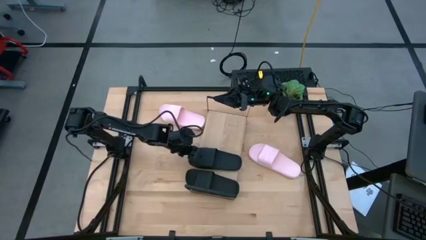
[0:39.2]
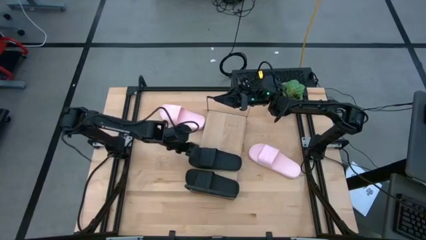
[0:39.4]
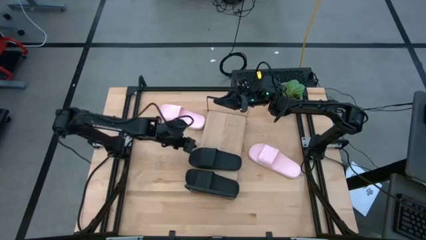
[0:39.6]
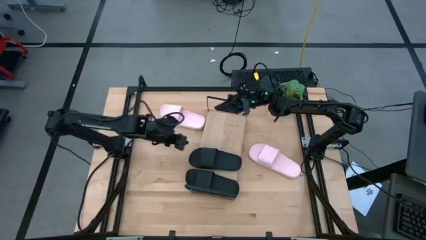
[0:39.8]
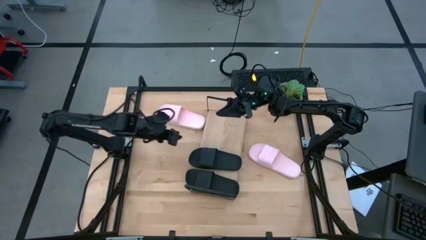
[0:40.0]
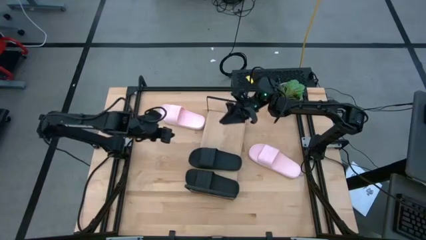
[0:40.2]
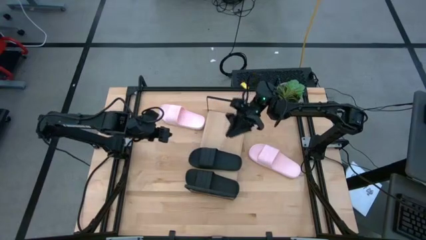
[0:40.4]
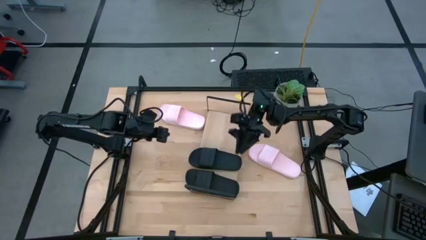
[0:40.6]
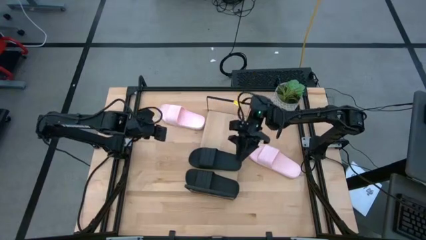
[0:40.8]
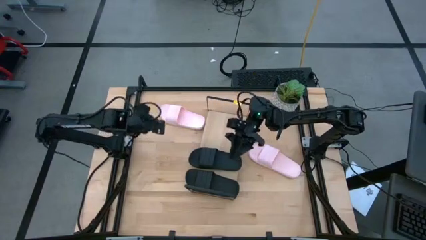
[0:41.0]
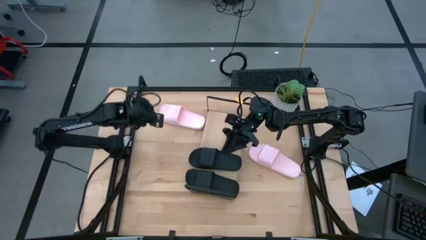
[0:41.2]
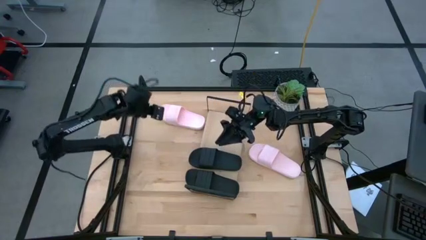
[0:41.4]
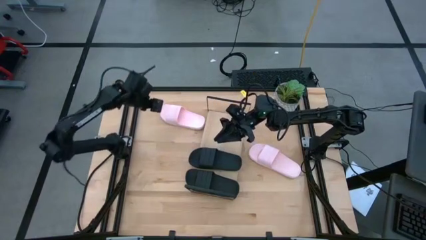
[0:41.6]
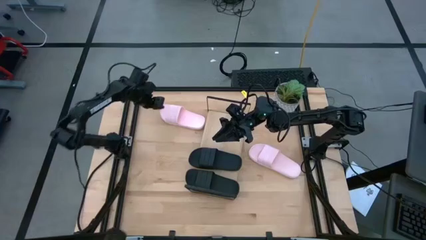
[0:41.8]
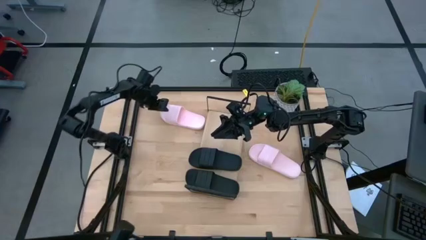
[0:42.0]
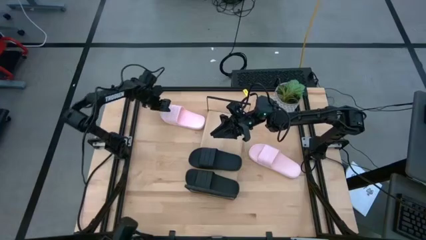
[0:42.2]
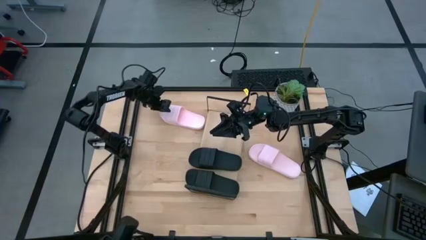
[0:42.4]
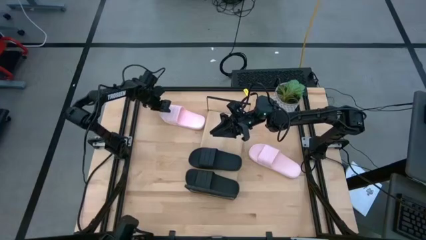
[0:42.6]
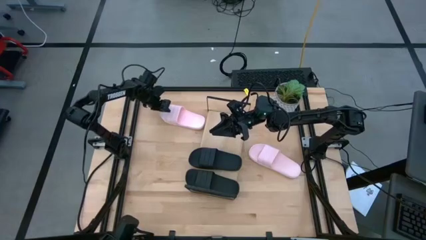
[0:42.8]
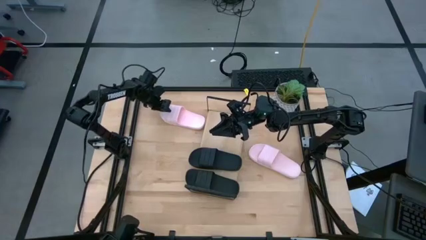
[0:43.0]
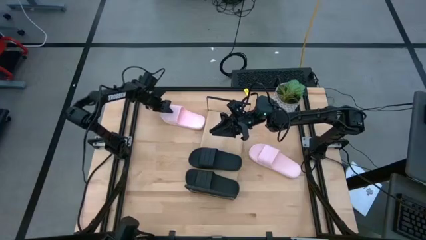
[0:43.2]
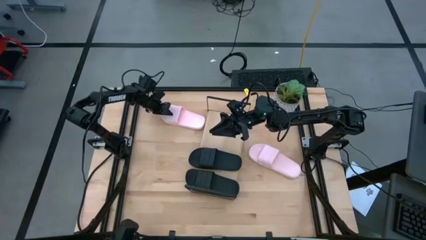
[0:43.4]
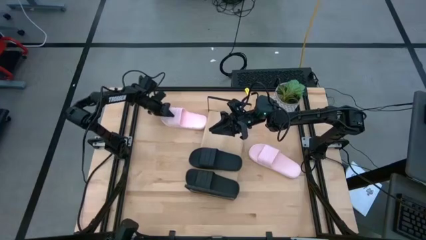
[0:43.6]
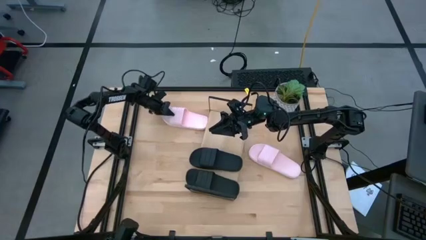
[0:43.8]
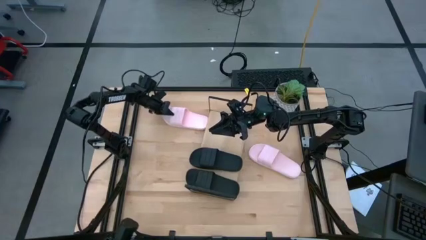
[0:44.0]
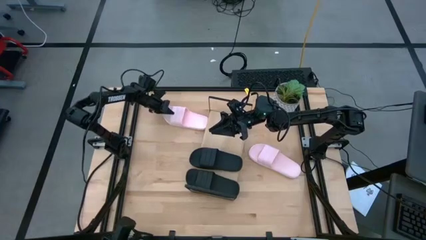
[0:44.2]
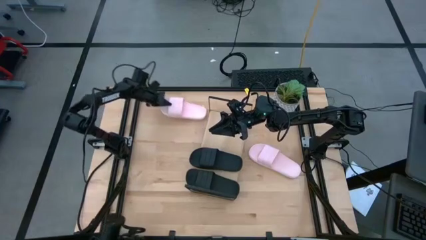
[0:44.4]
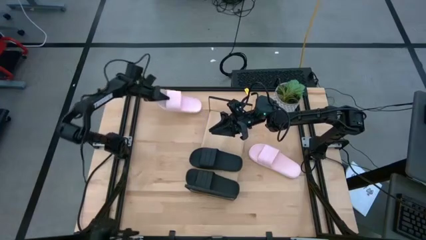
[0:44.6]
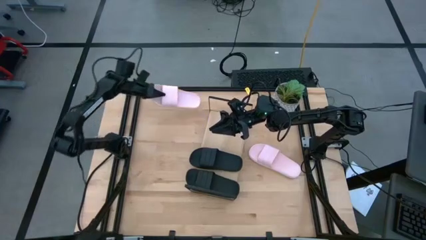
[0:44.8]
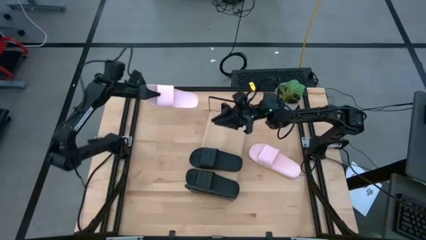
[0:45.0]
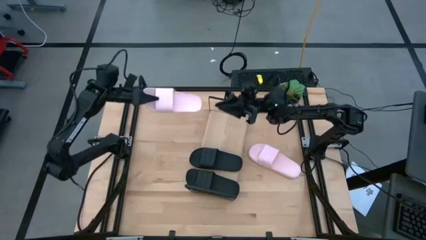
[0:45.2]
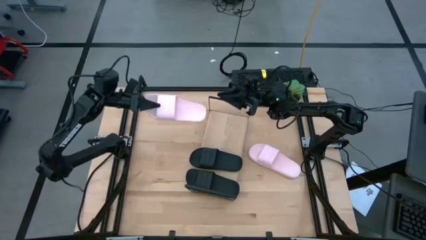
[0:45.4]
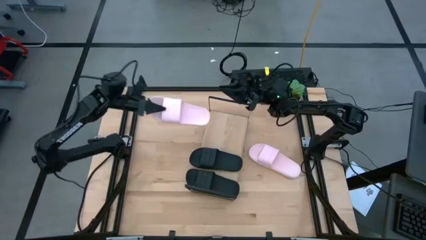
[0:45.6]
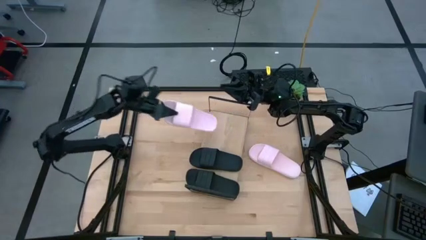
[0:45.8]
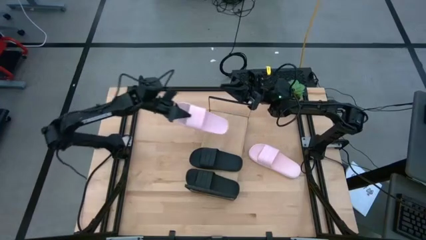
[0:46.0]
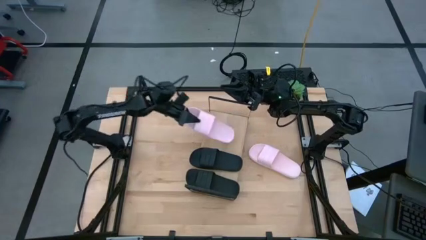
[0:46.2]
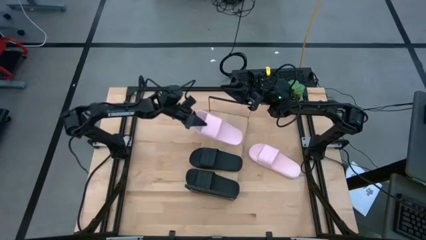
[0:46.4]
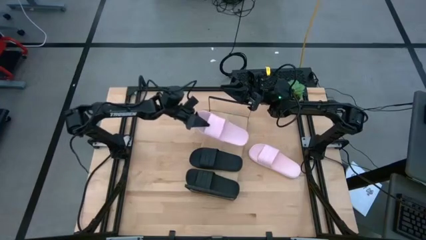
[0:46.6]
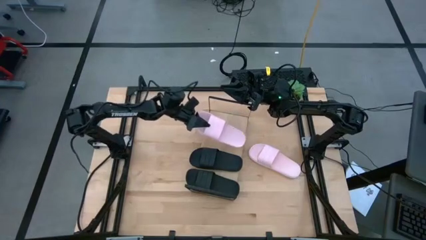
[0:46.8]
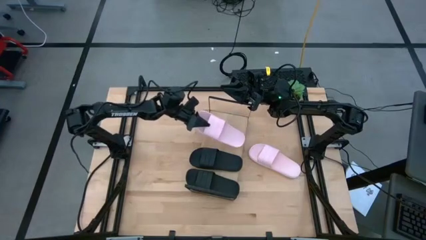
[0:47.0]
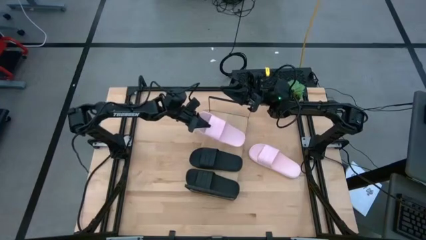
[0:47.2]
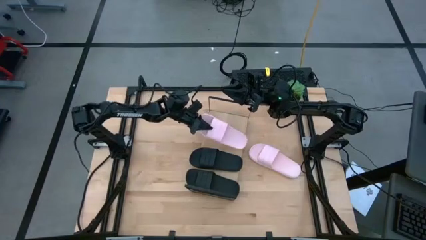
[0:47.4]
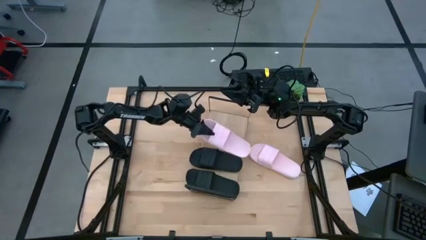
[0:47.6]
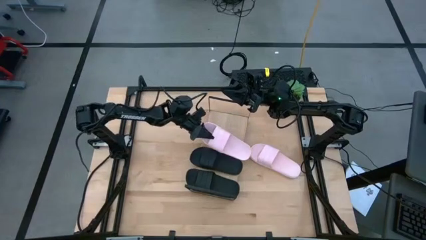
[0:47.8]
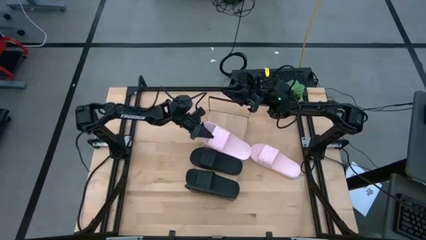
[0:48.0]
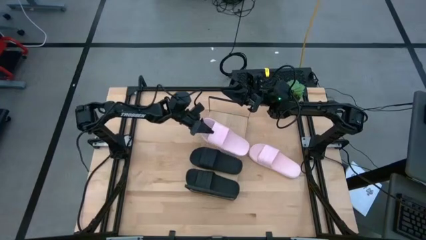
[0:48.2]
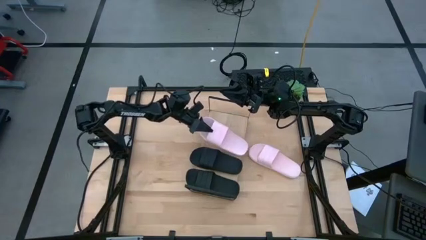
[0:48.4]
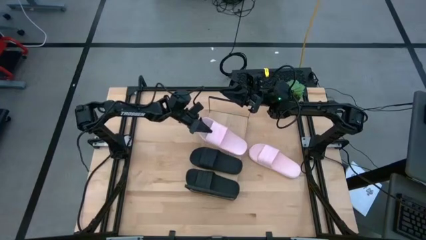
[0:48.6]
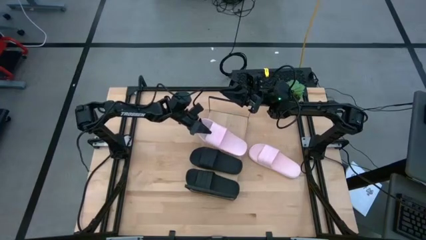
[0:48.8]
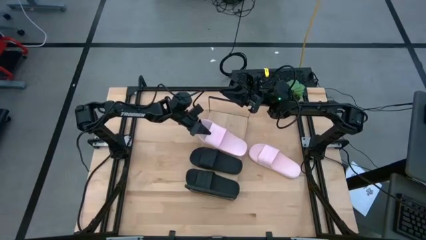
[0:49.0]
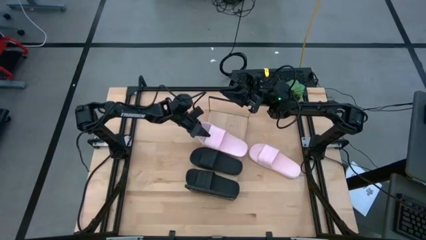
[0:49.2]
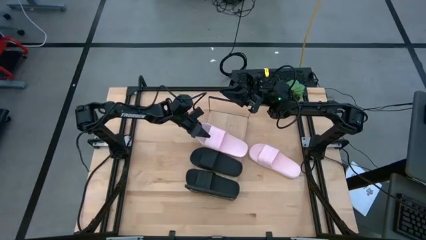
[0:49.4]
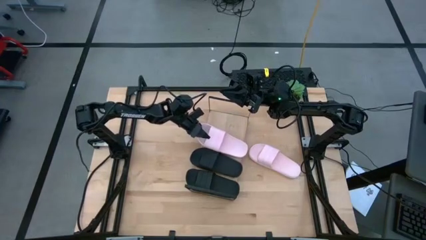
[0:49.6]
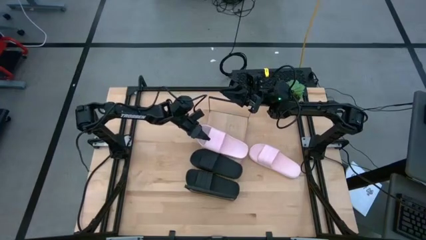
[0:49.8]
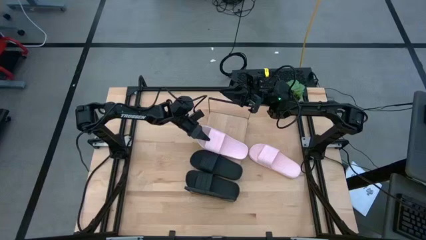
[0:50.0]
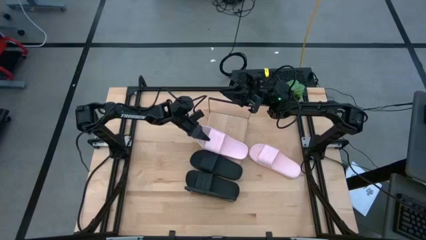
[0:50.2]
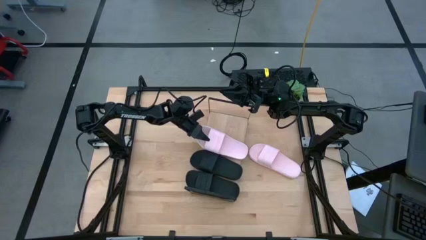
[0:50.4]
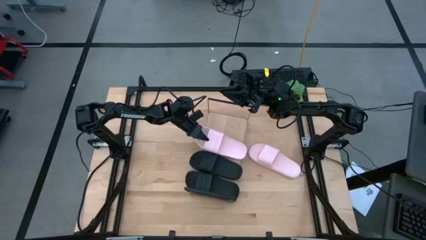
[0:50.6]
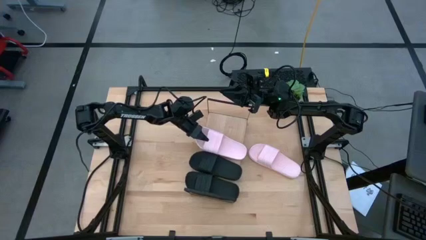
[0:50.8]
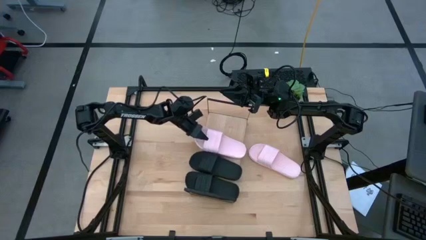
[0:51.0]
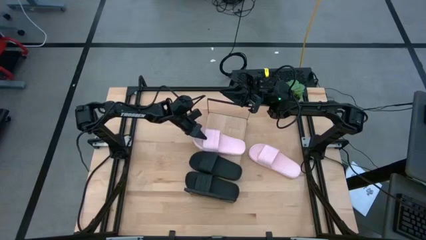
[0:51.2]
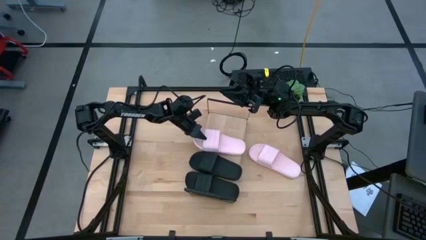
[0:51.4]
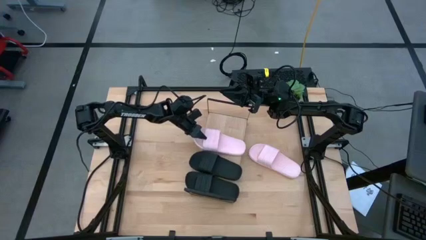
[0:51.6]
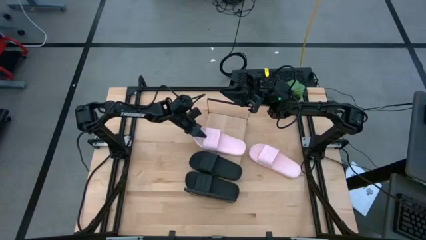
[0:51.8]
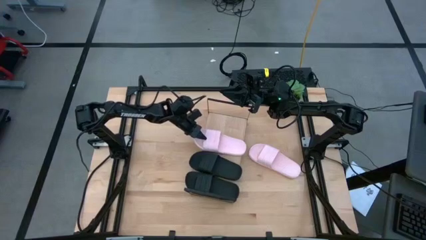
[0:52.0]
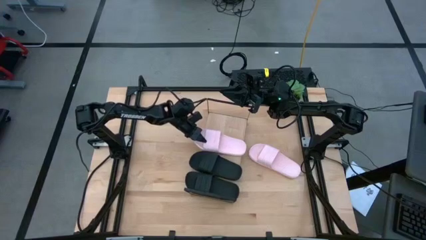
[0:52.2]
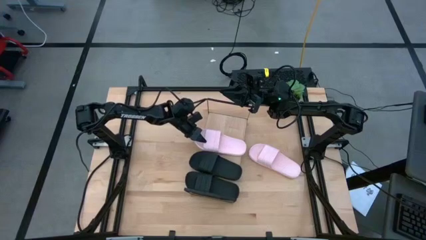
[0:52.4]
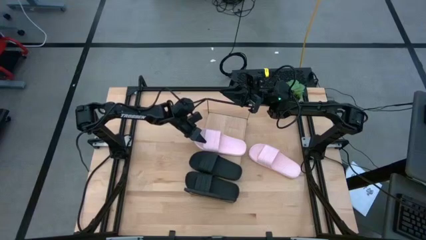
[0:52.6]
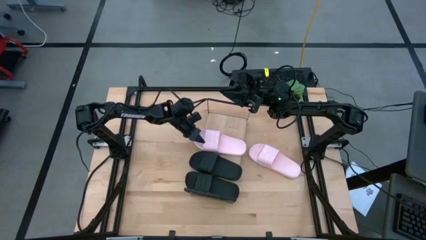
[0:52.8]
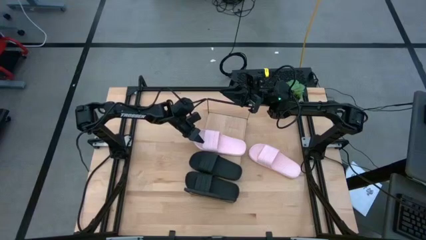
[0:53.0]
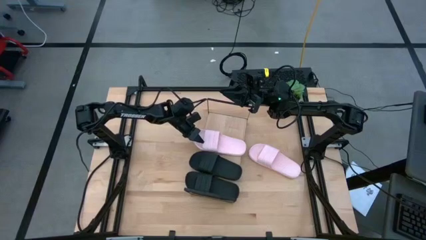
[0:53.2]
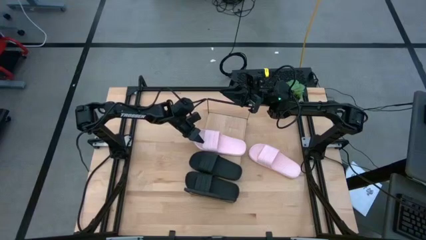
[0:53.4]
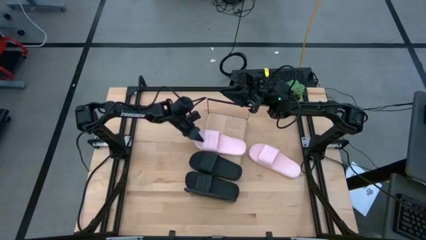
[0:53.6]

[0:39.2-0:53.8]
Task: Pick and place slides into the shelf
Put the left pink slide on the shelf

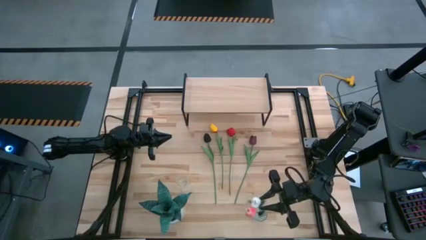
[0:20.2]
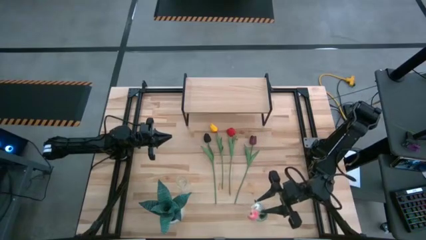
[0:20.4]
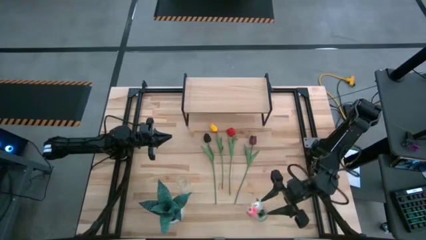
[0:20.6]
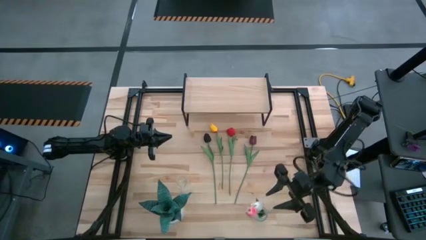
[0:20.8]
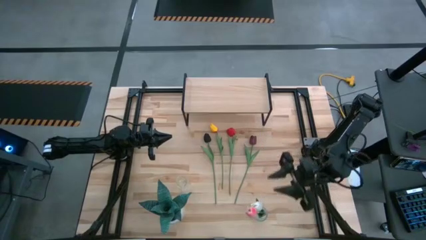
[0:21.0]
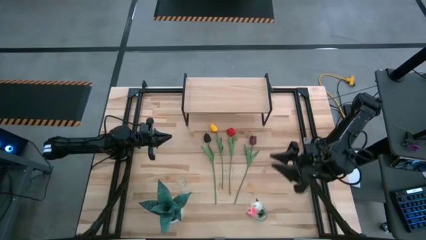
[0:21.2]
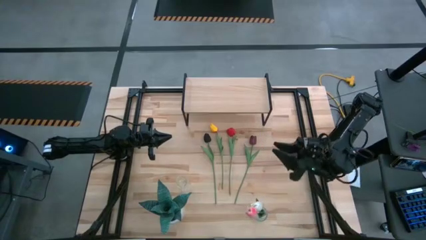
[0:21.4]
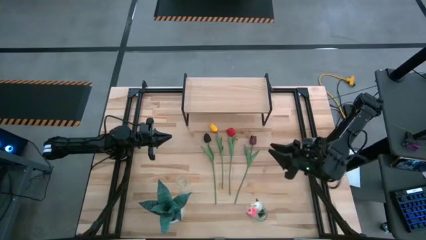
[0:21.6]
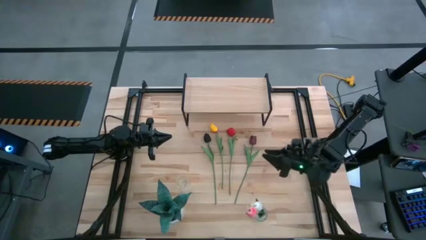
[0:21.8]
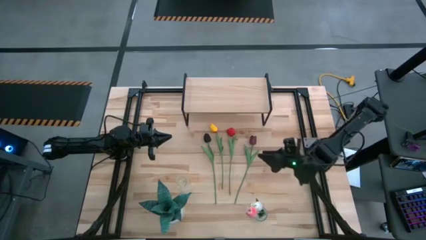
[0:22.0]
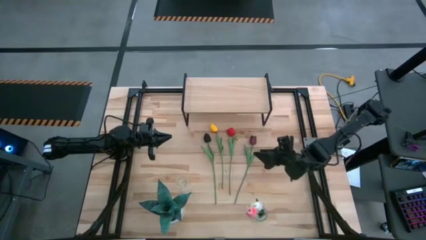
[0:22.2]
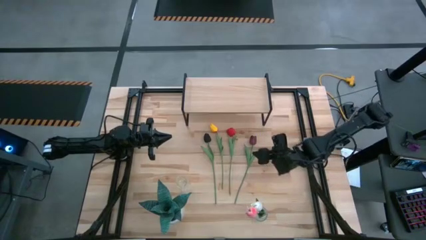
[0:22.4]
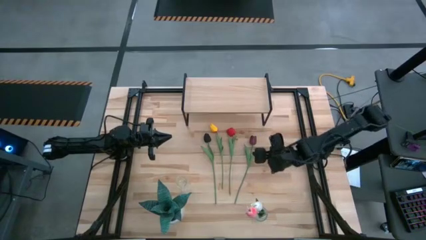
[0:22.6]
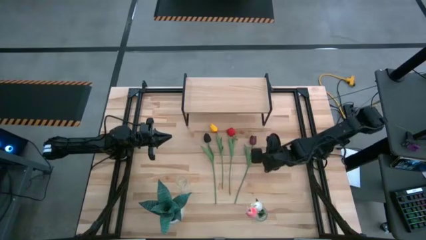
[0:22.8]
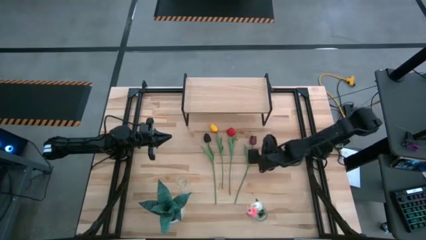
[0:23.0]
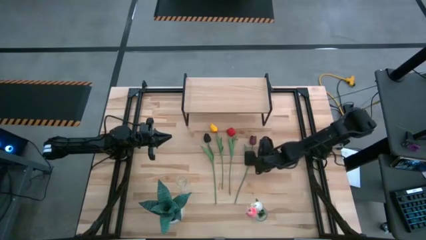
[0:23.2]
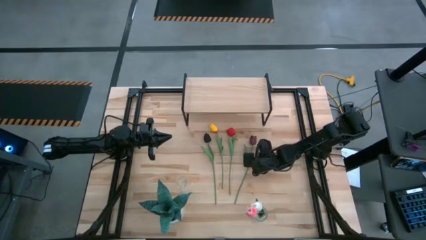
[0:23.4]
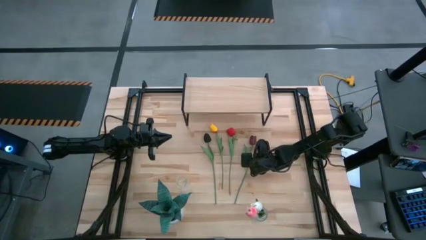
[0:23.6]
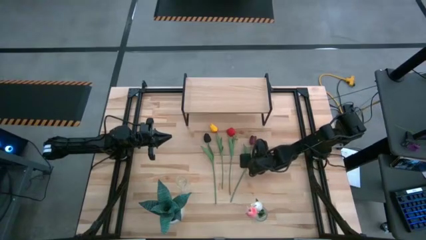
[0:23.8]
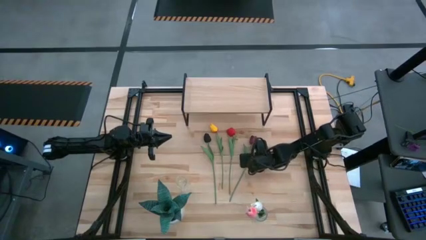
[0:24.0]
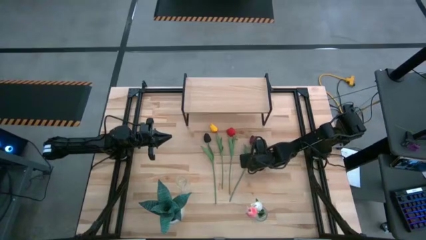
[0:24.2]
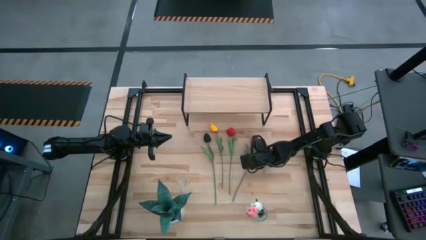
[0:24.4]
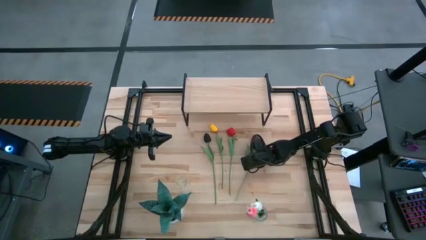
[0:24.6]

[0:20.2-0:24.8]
Task: Pick and place flowers into a vace then onto a shelf
Put the dark red flower into the bottom transparent vase
